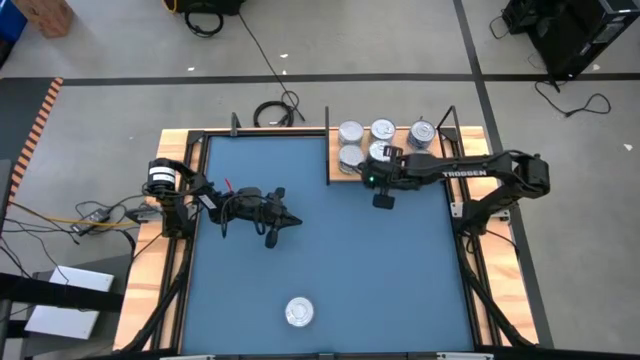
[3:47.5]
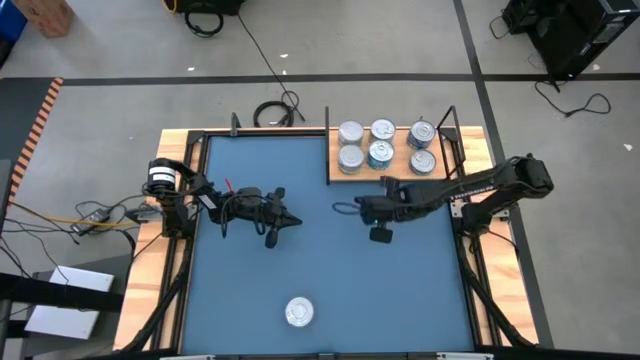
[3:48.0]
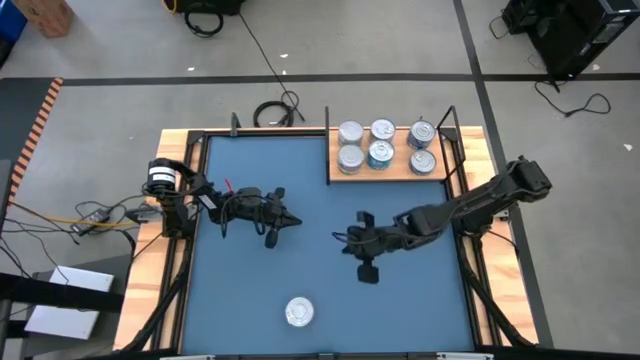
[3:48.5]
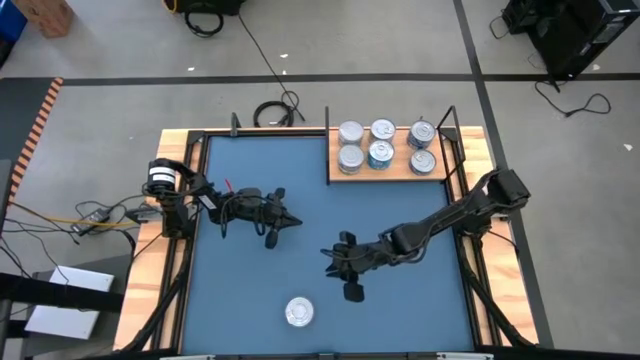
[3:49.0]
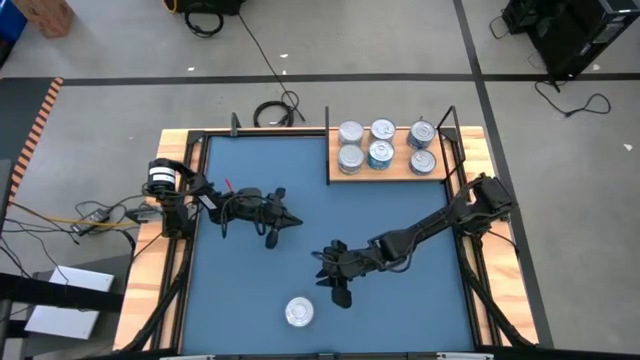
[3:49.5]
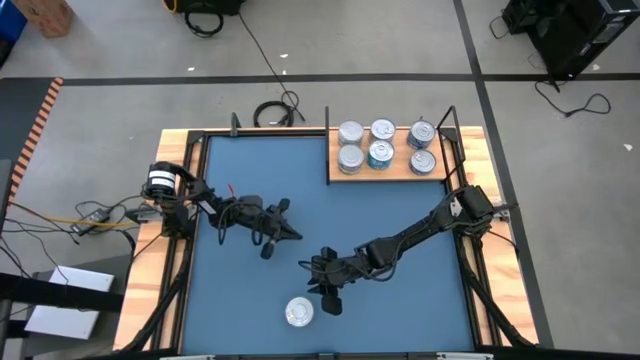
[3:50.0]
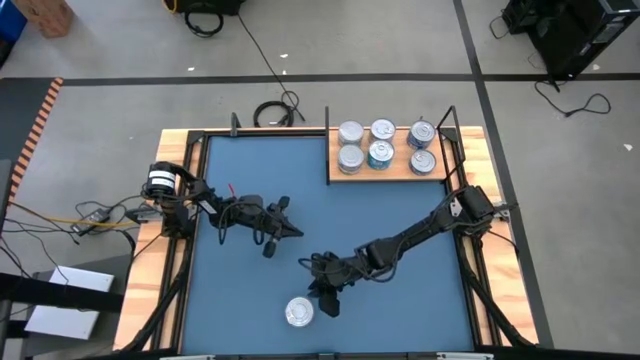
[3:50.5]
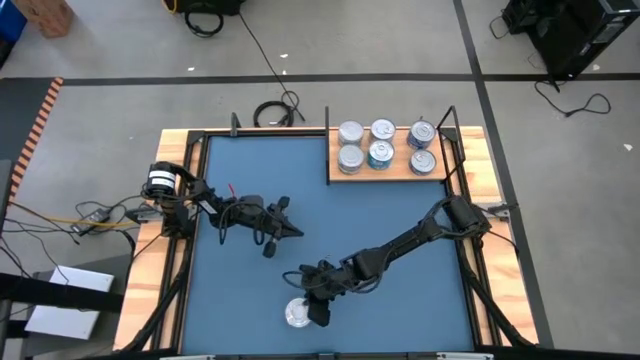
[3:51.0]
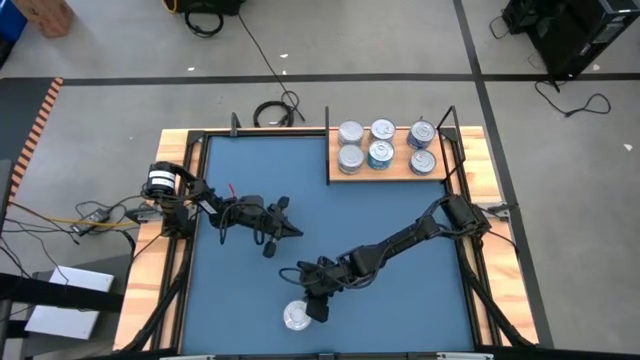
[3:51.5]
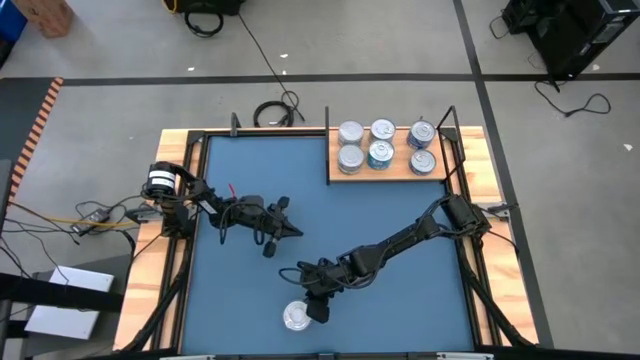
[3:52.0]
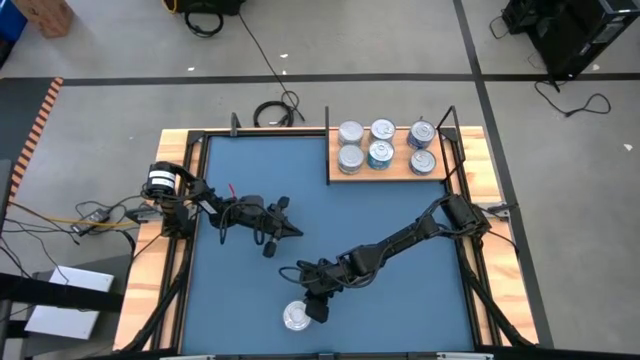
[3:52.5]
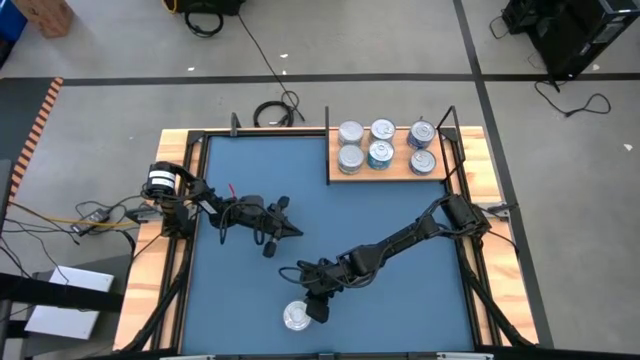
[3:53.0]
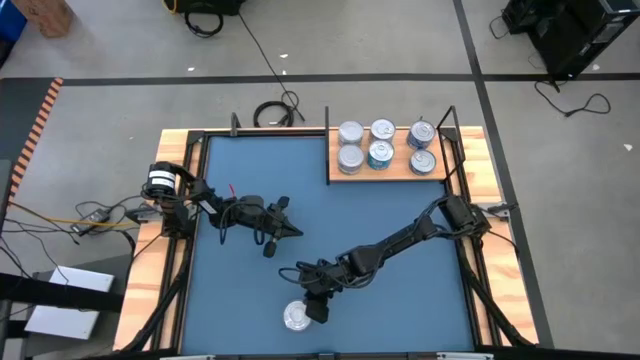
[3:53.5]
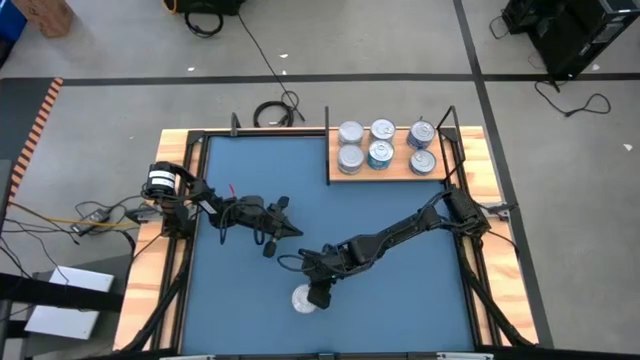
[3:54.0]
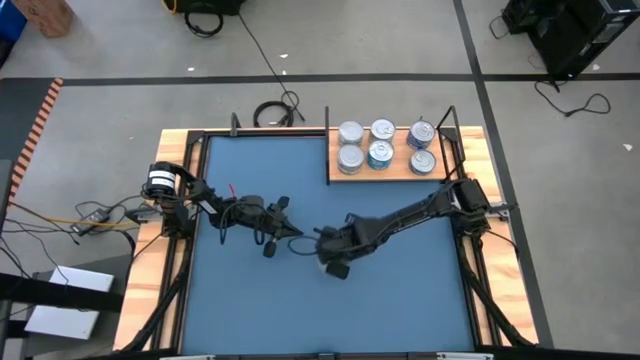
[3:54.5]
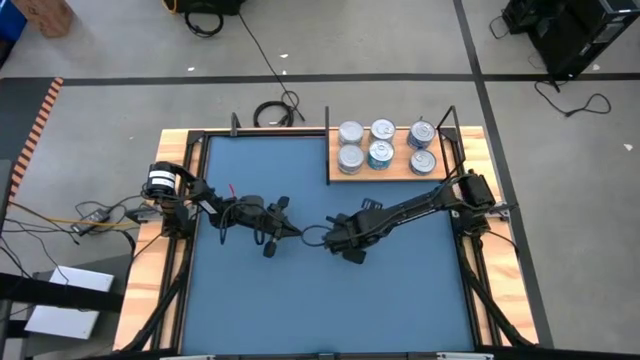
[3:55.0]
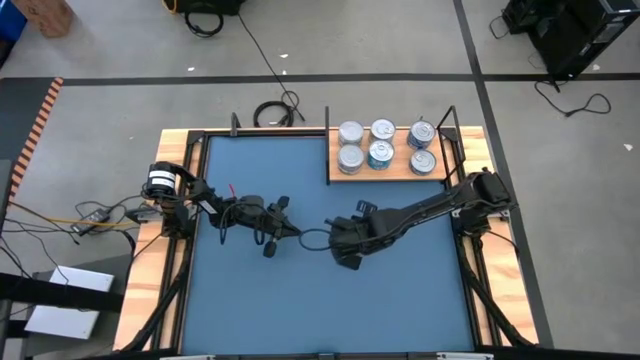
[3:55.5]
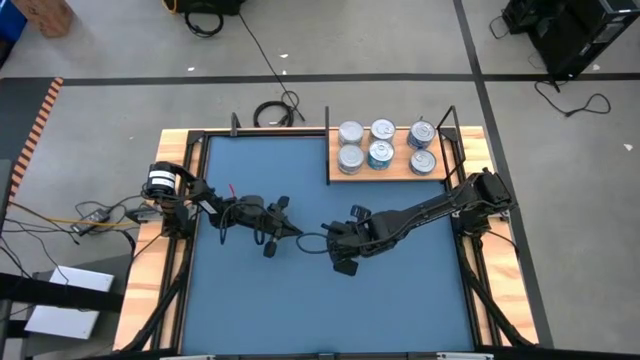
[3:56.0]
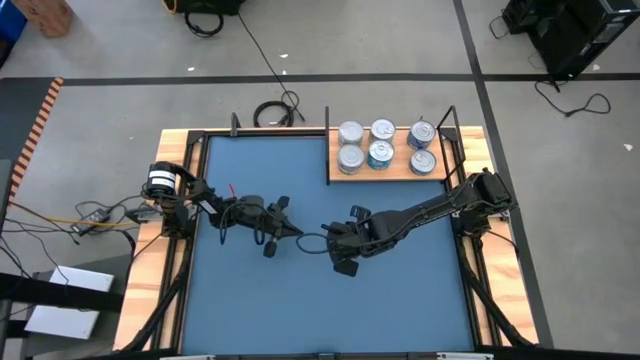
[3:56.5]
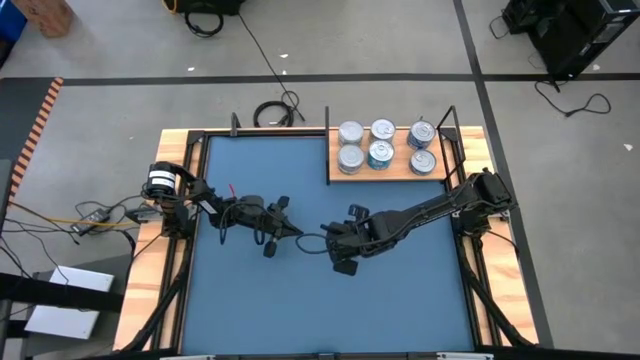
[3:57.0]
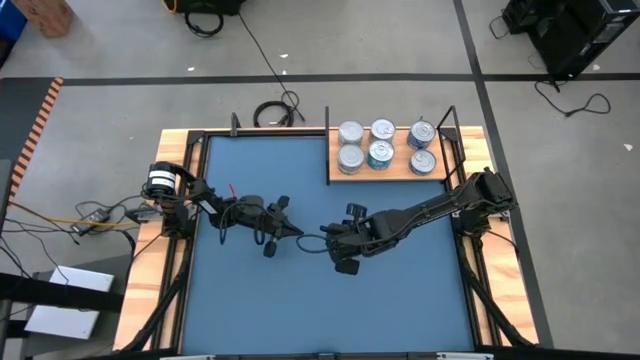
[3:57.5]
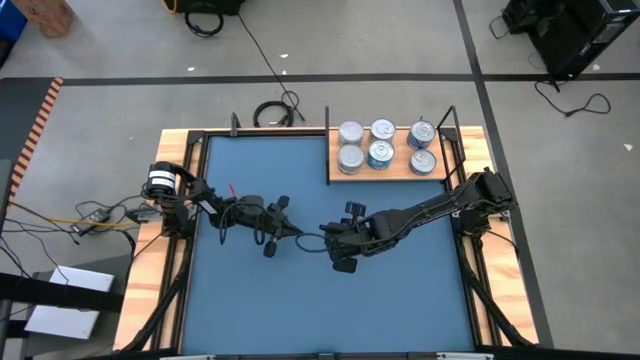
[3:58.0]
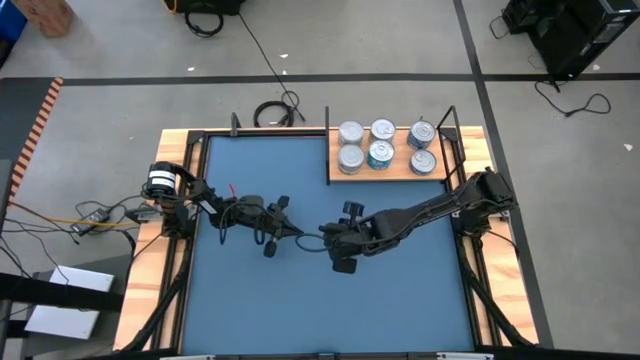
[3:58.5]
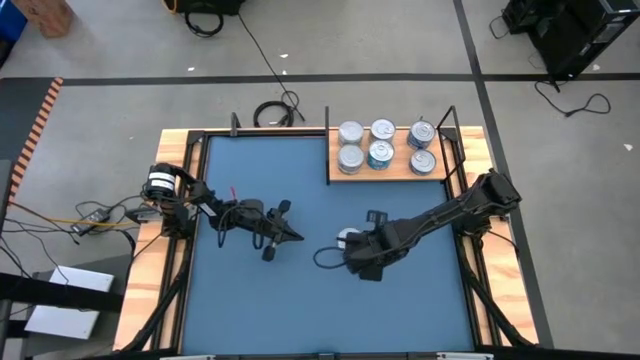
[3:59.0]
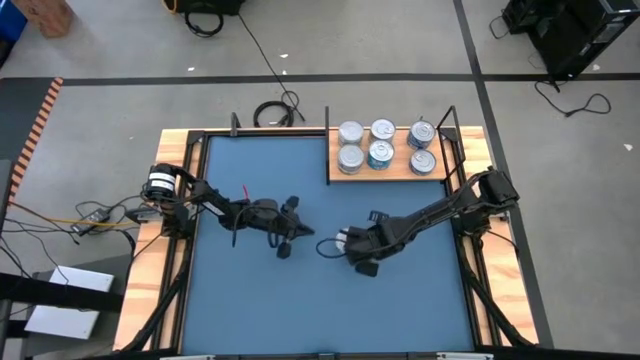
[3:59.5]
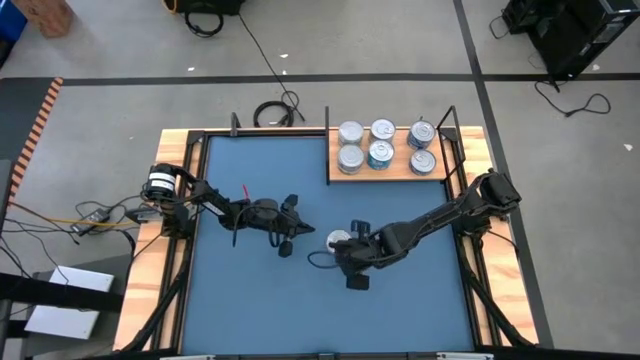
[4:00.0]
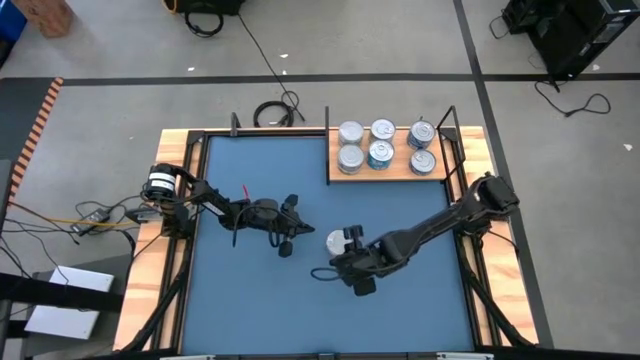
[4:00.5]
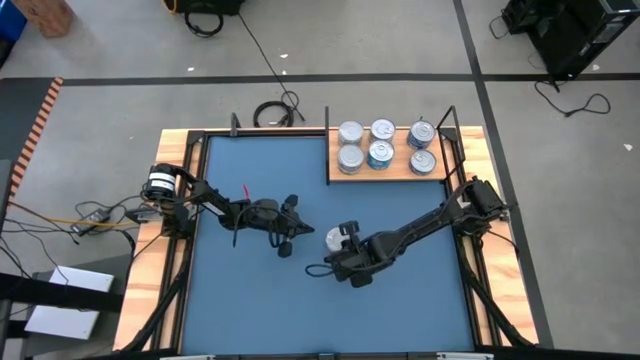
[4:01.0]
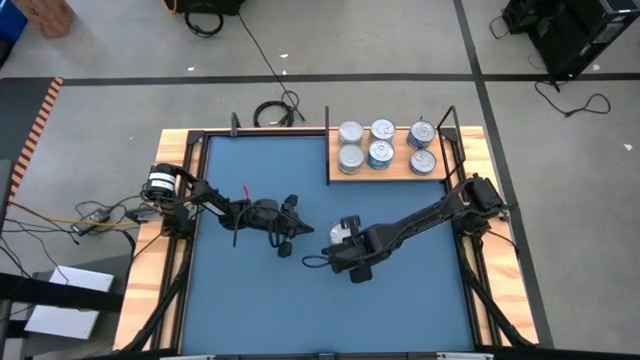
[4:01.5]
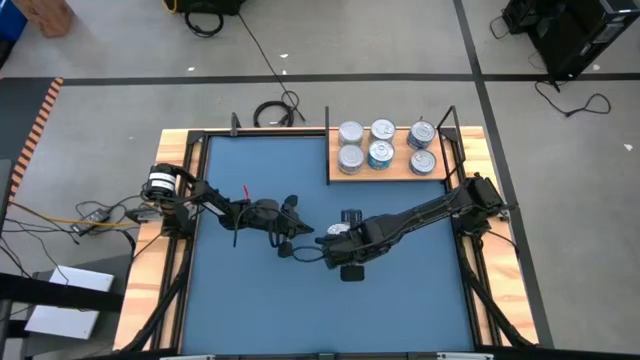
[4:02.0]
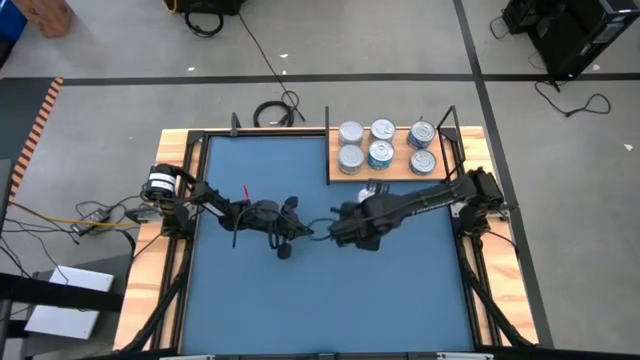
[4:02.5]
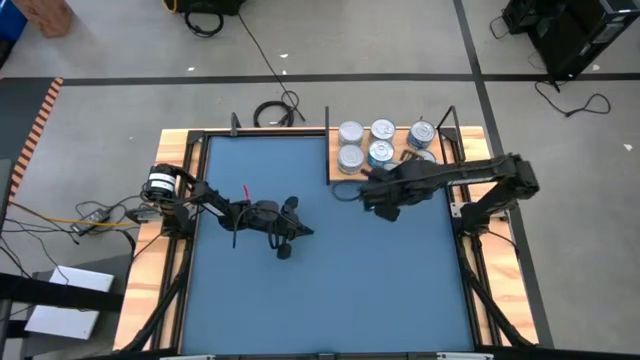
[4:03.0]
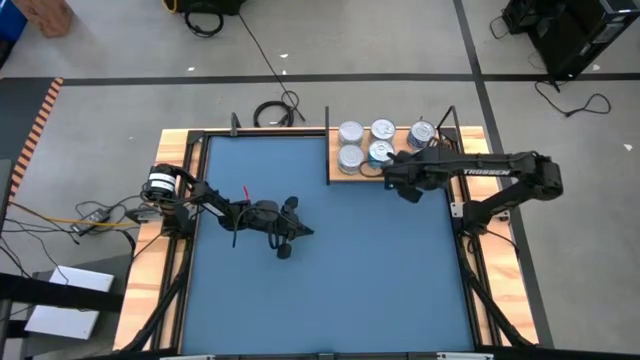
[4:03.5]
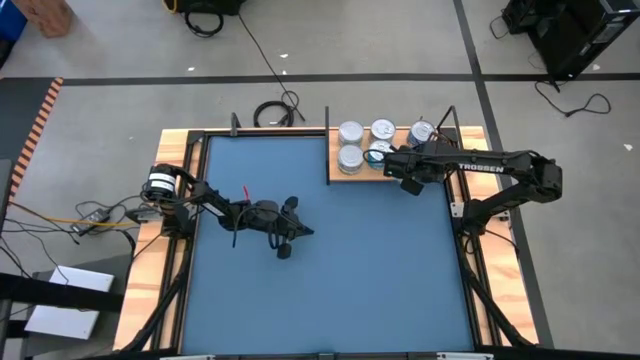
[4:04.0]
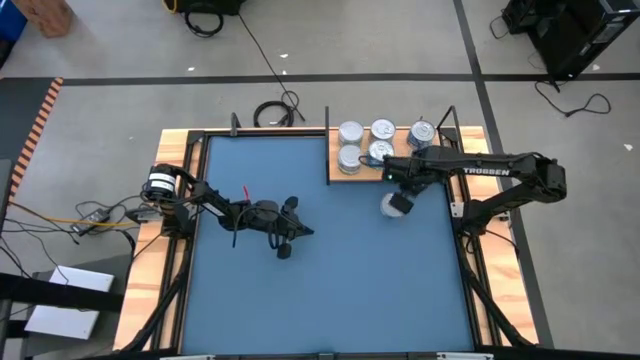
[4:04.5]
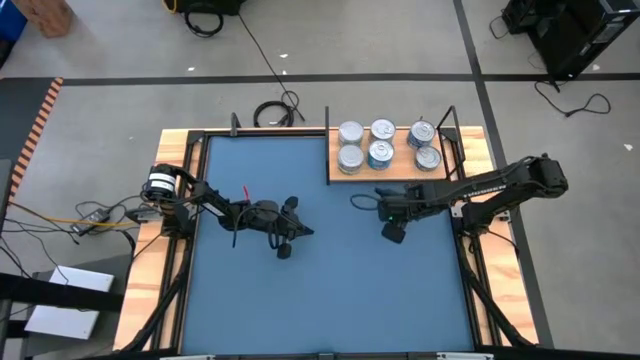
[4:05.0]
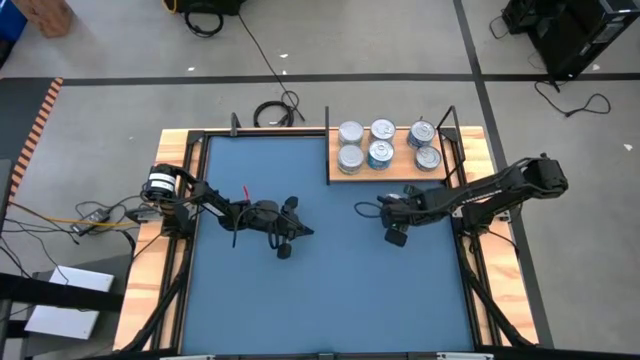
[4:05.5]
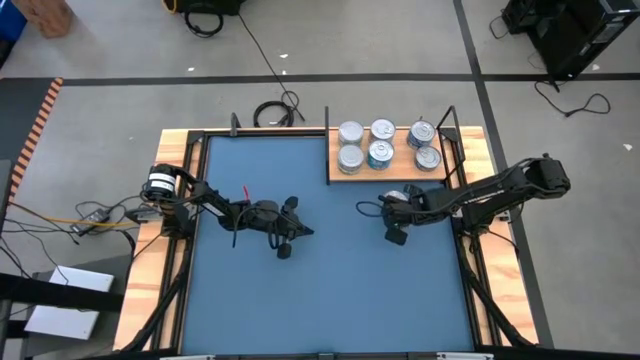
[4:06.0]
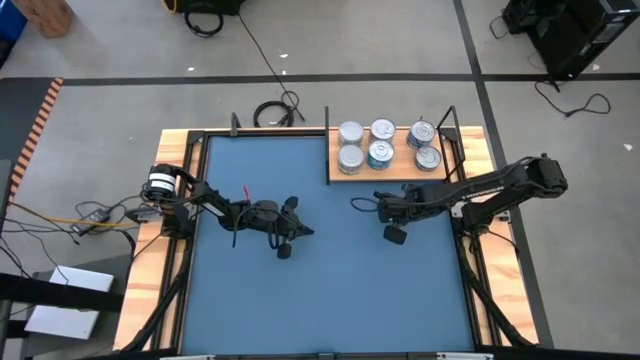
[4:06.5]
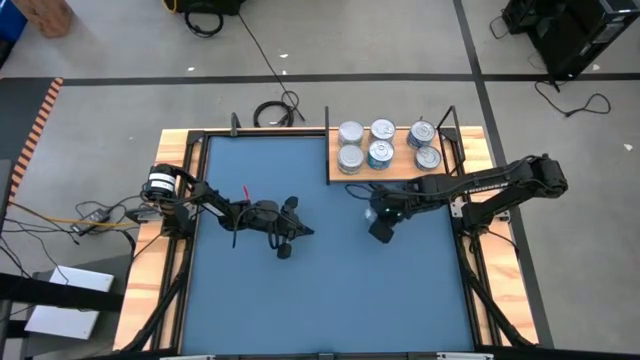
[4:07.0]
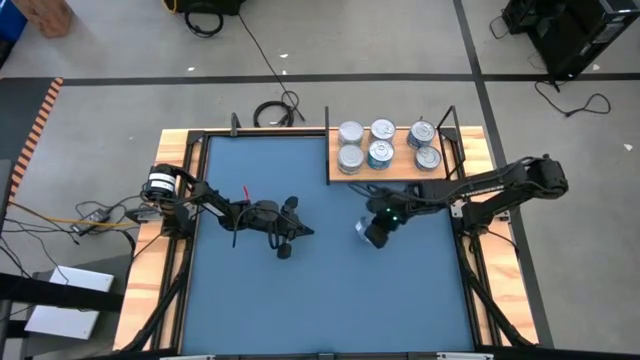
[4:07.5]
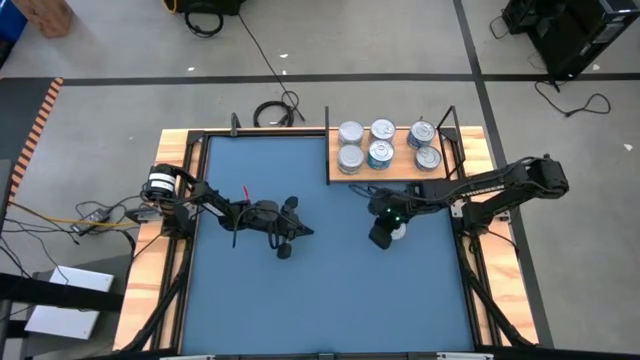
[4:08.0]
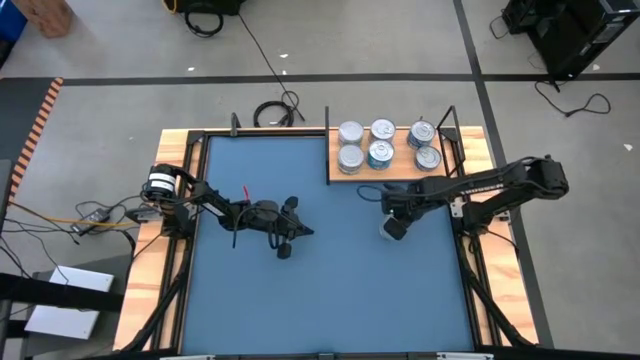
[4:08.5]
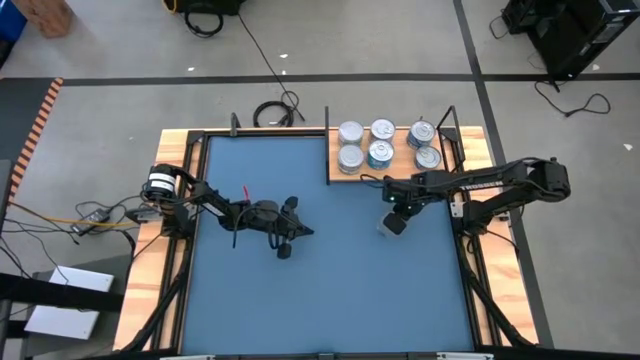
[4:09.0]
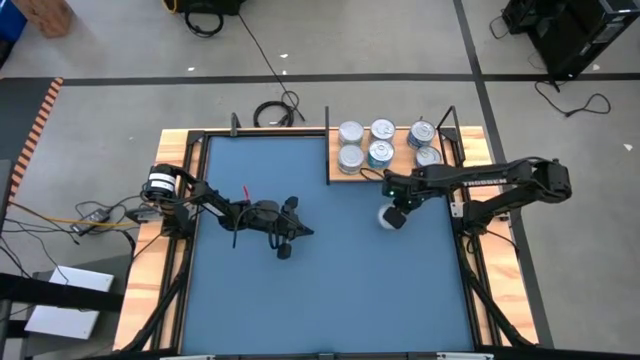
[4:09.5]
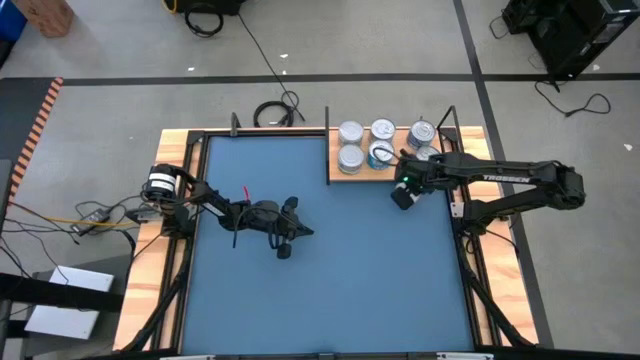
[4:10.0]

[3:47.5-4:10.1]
Task: Stack canned seafood by type on shelf
Stack the blue tuna can on to the blue tuna can on the shelf
